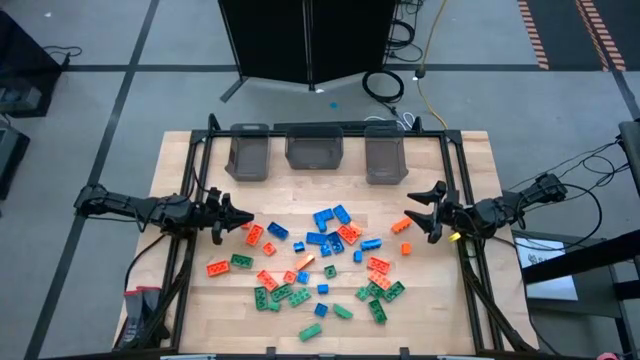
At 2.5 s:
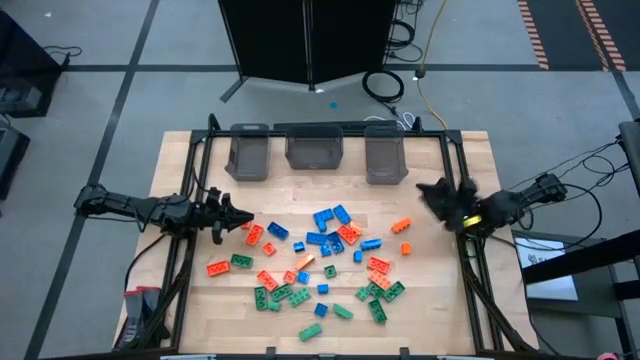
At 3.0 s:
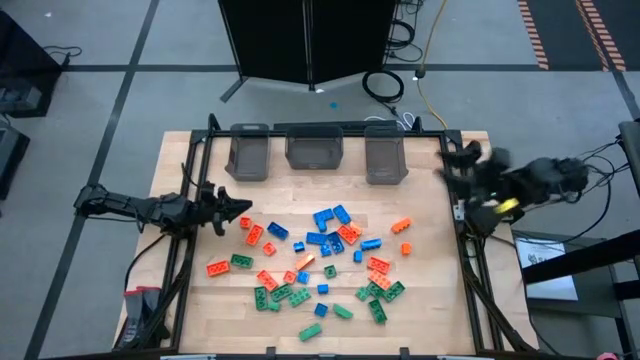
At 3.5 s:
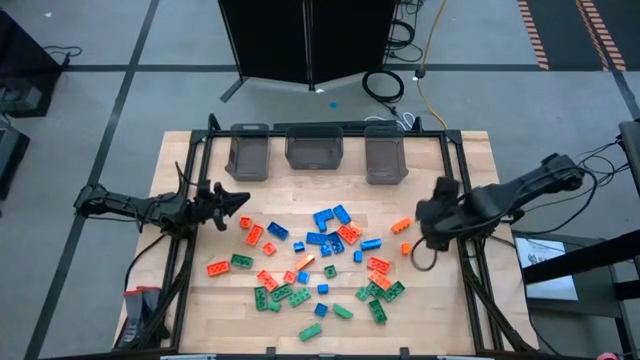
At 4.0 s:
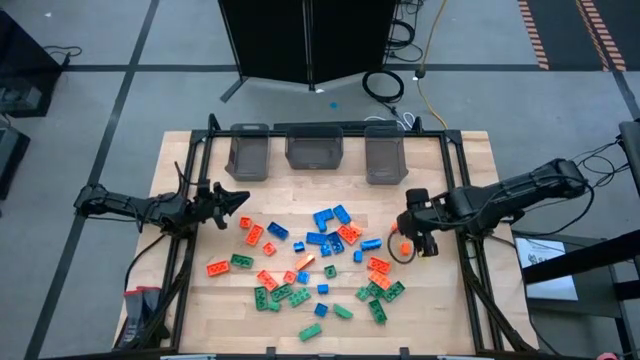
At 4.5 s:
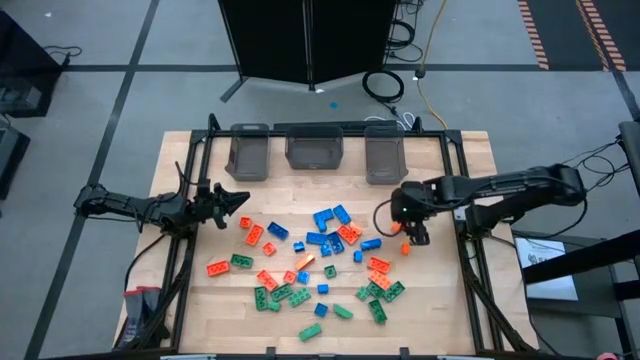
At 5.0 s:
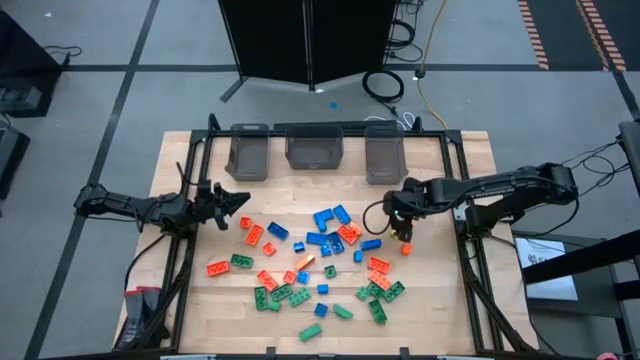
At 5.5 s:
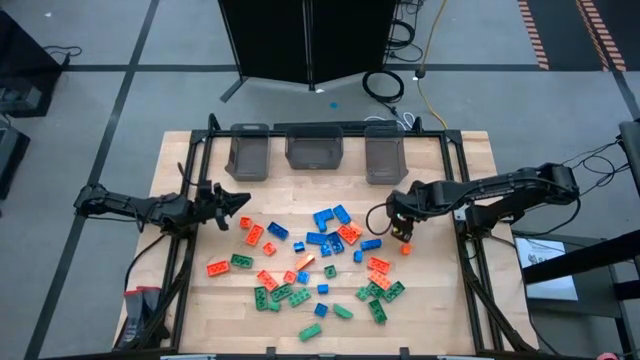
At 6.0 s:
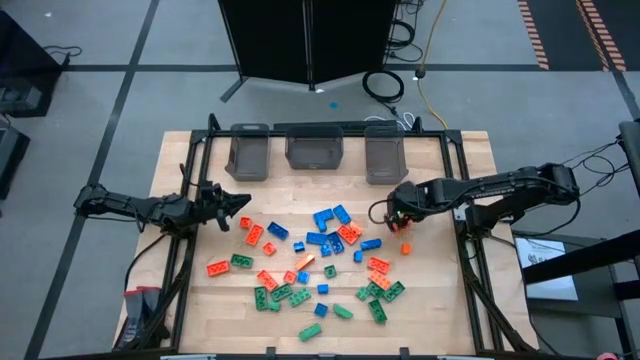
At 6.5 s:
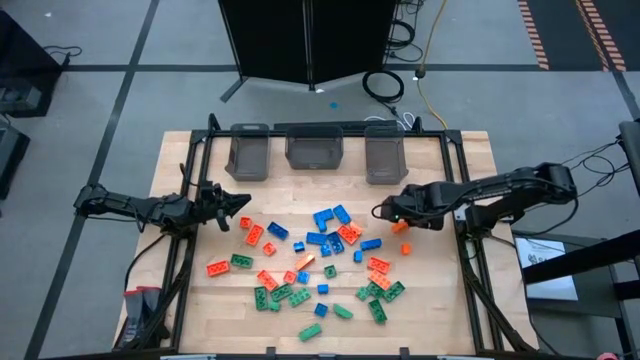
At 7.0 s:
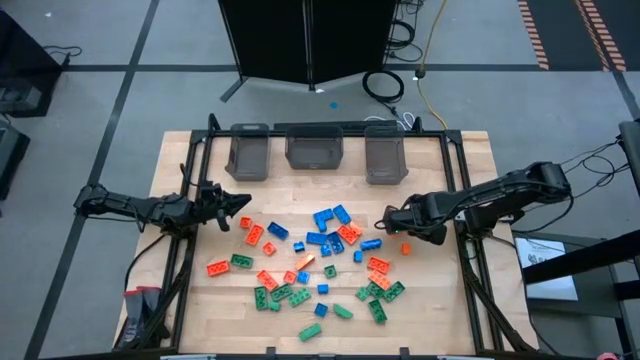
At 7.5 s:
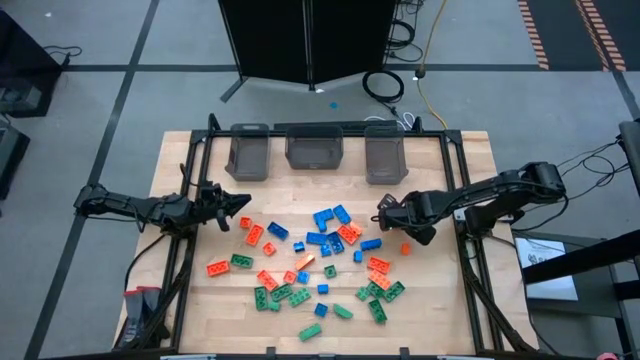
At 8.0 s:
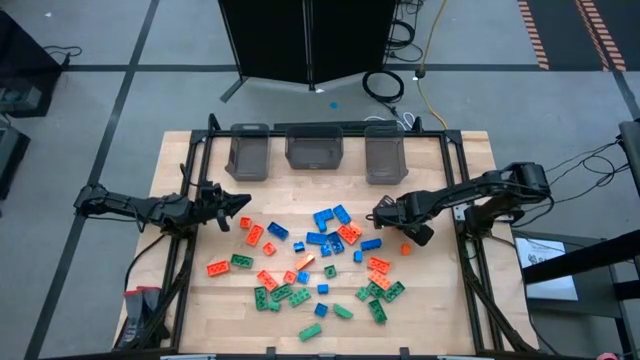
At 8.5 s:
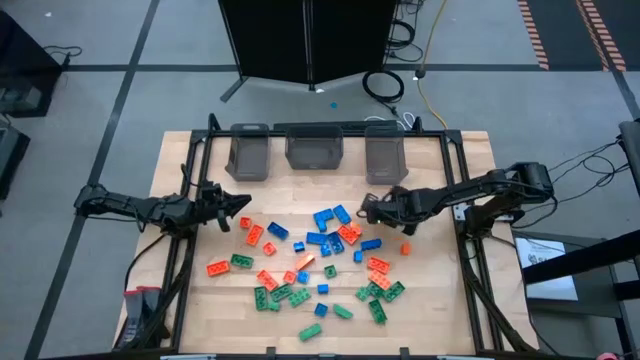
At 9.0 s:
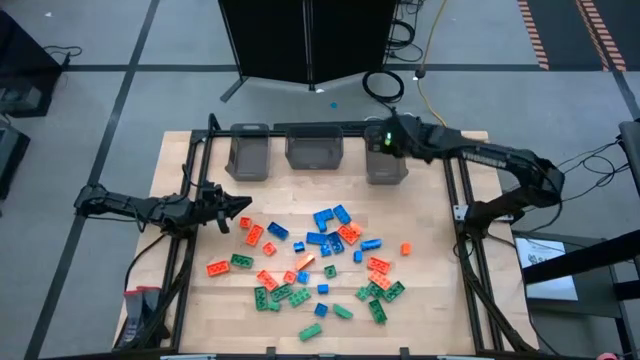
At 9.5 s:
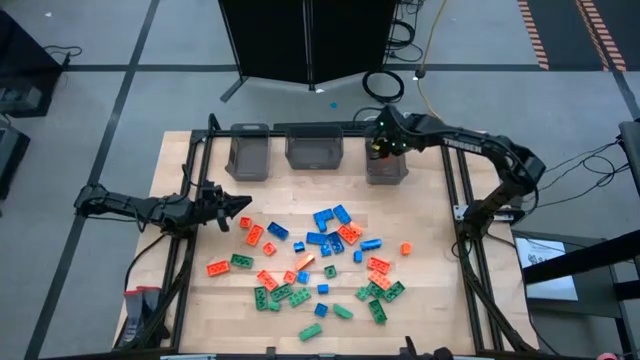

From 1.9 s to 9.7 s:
Task: Sort blocks
Put the orange game piece into the right black bin

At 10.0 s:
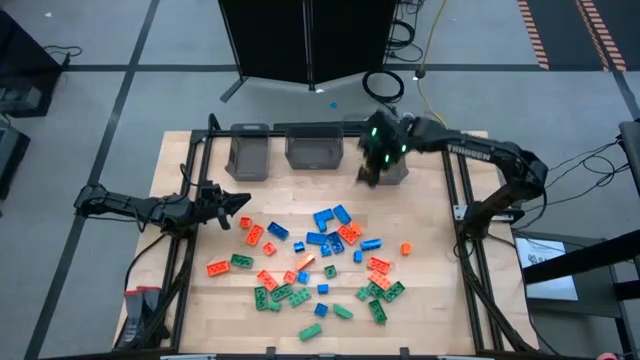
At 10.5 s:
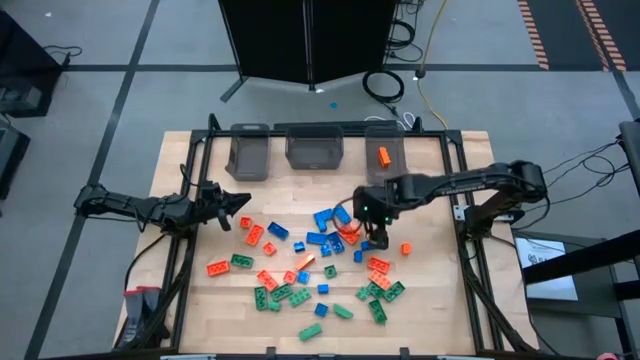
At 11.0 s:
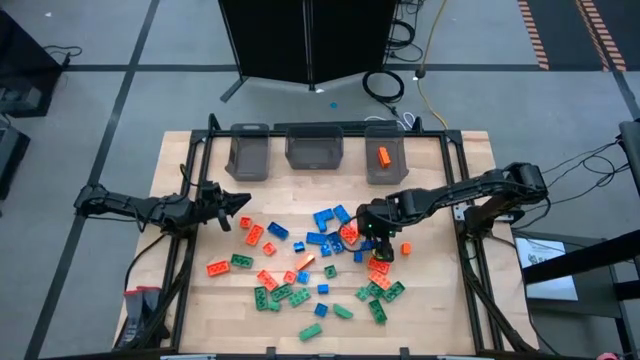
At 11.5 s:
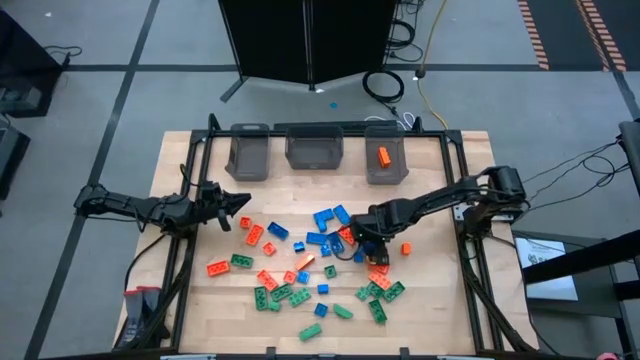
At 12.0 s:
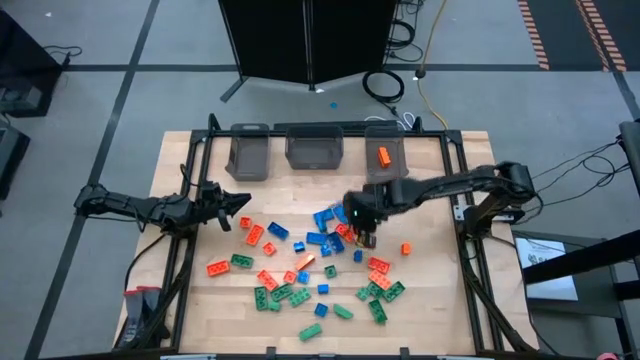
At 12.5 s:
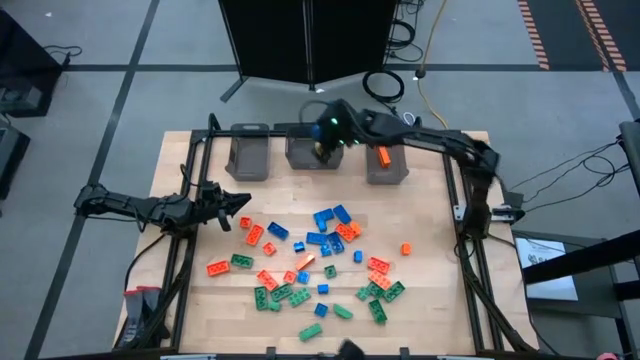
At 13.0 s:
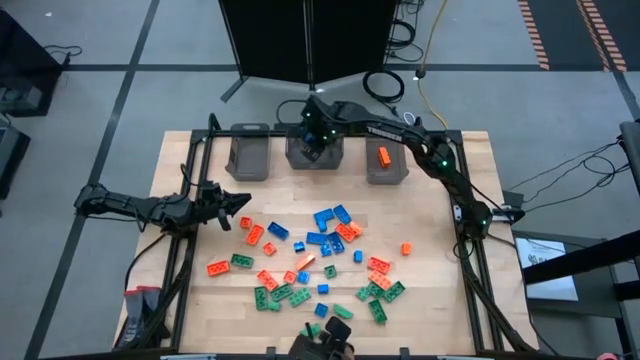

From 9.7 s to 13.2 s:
Put the blue game piece into the middle black bin

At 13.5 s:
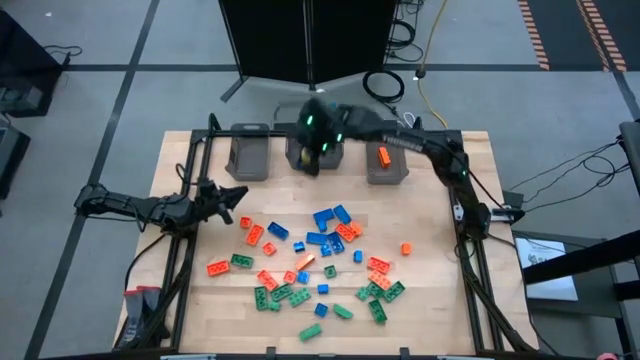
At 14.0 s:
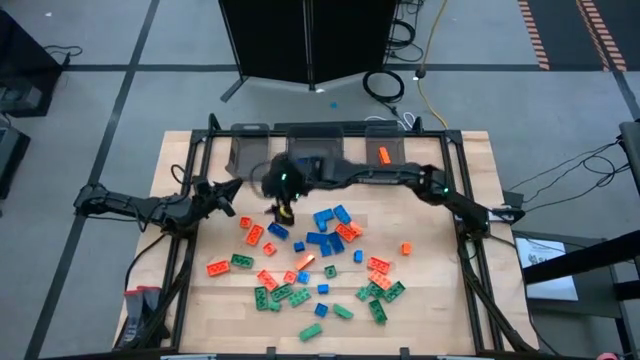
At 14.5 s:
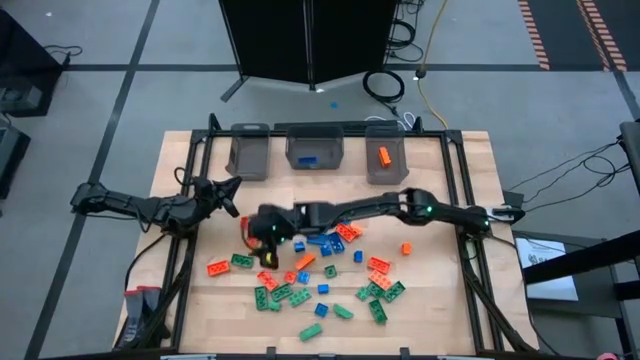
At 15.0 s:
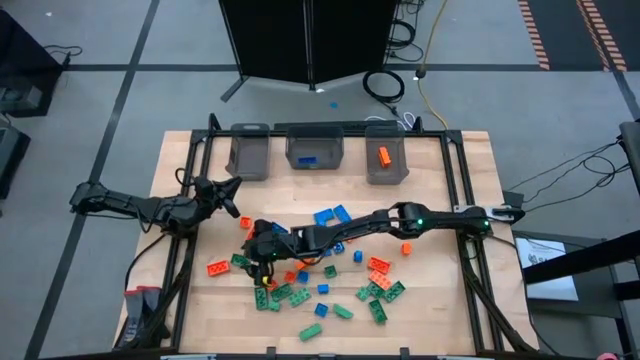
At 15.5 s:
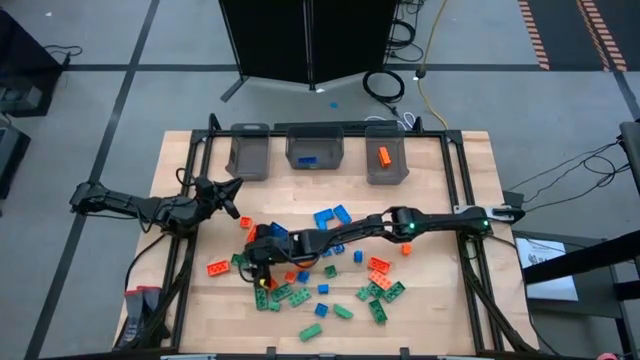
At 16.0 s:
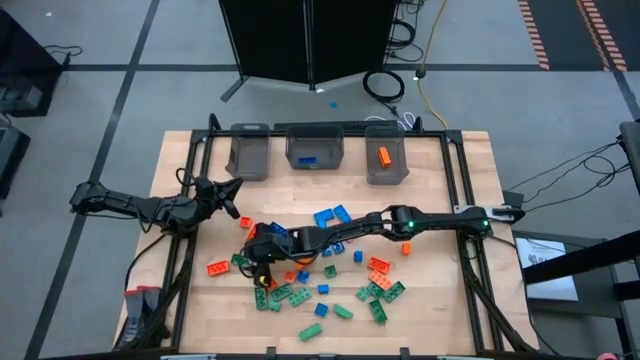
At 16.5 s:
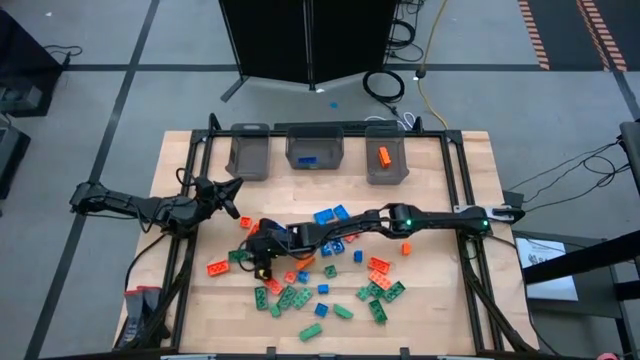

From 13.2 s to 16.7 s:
Put the green game piece into the left black bin

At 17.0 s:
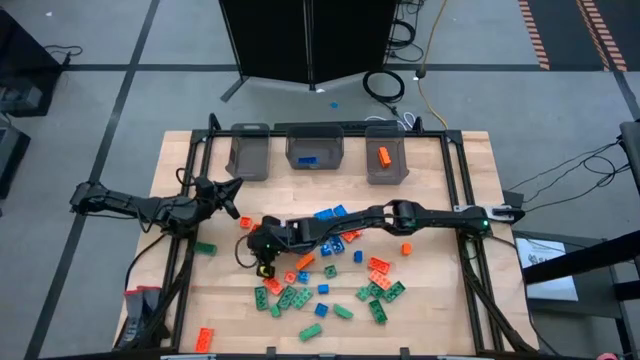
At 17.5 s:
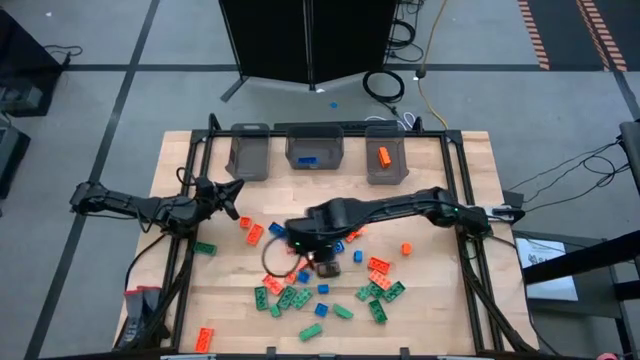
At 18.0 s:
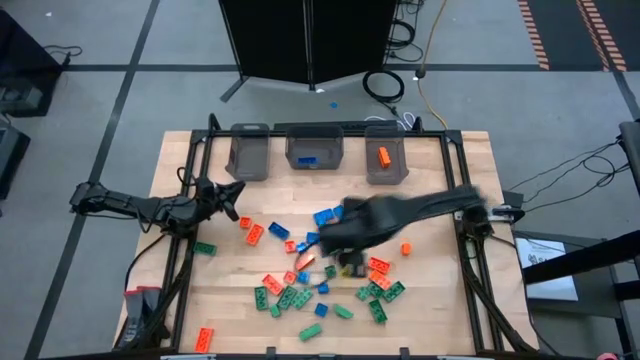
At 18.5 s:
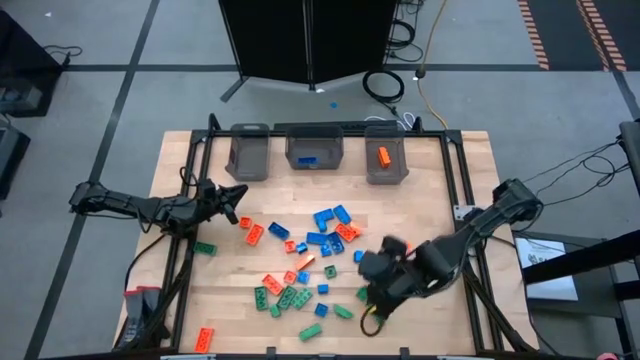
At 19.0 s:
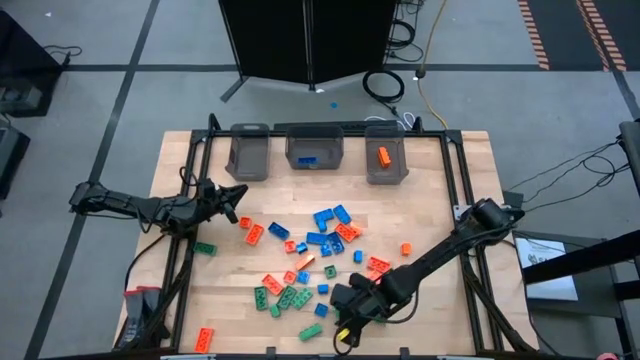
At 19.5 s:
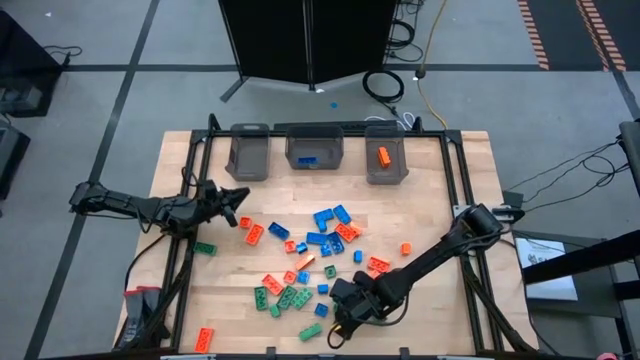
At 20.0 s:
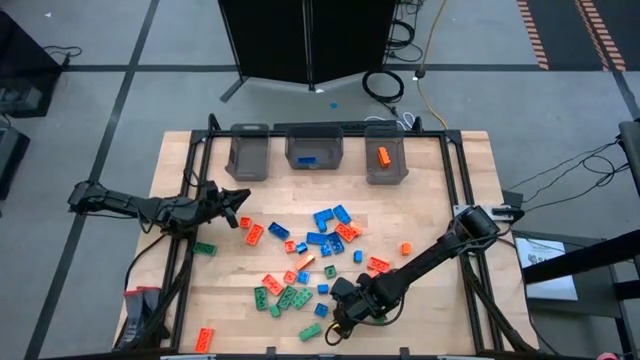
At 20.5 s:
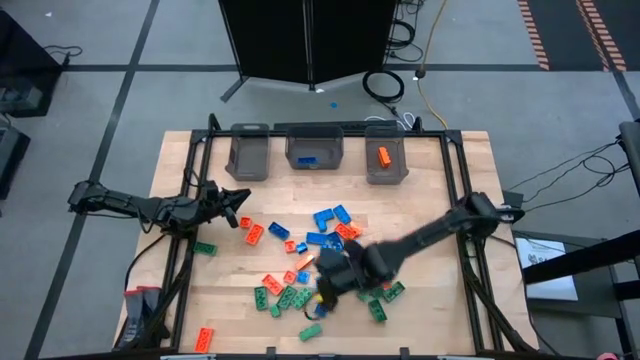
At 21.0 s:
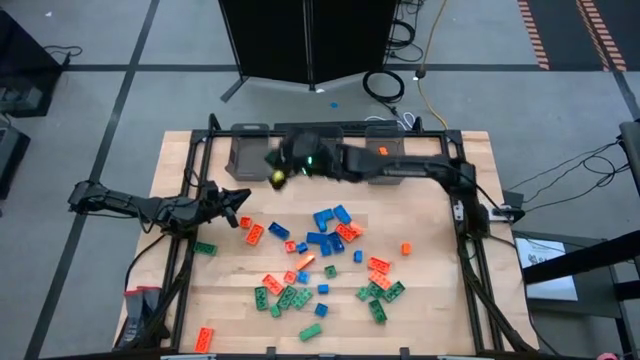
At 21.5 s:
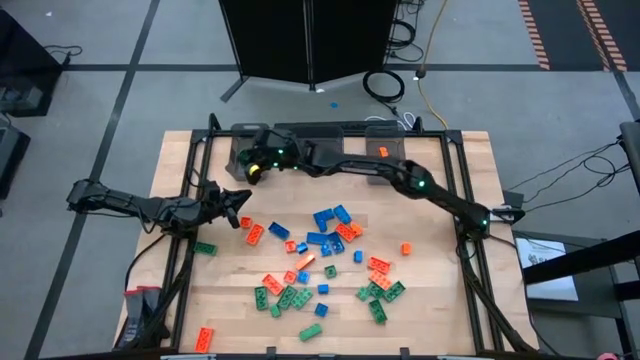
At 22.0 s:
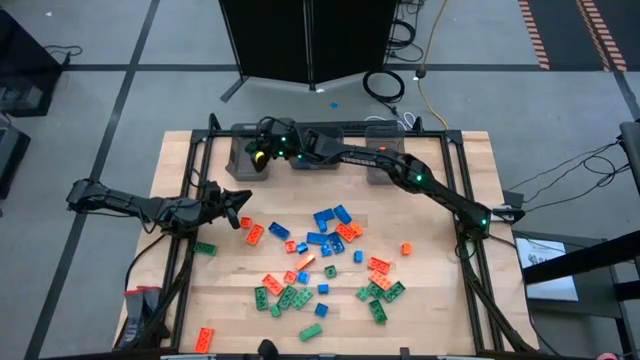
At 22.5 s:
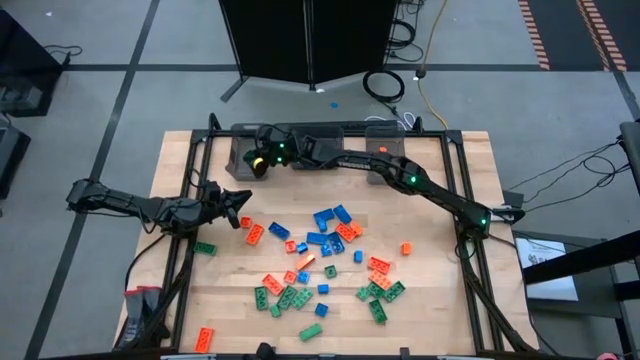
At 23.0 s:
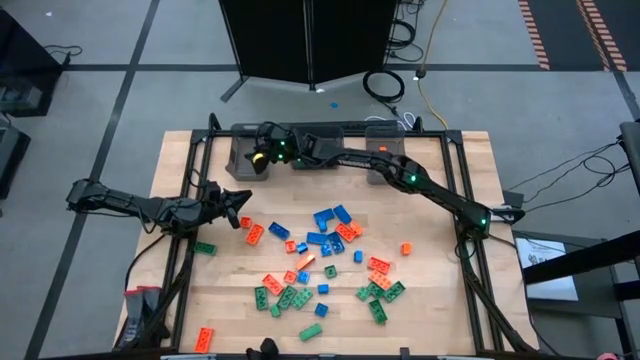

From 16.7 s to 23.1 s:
Put the green game piece into the left black bin
